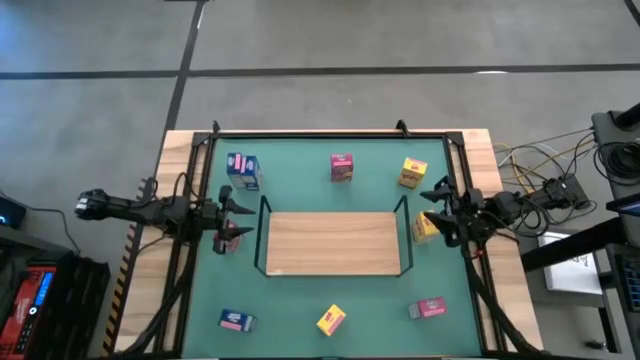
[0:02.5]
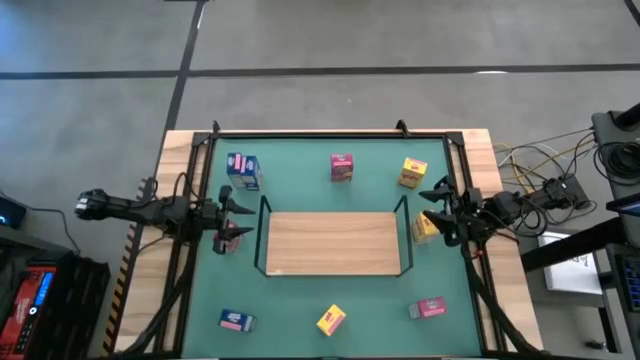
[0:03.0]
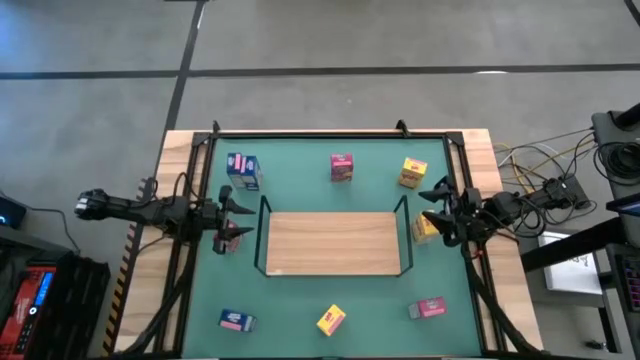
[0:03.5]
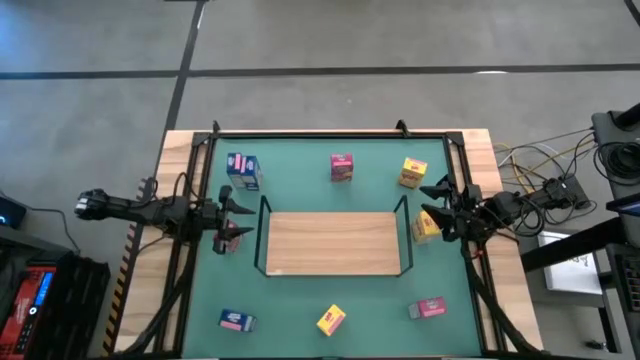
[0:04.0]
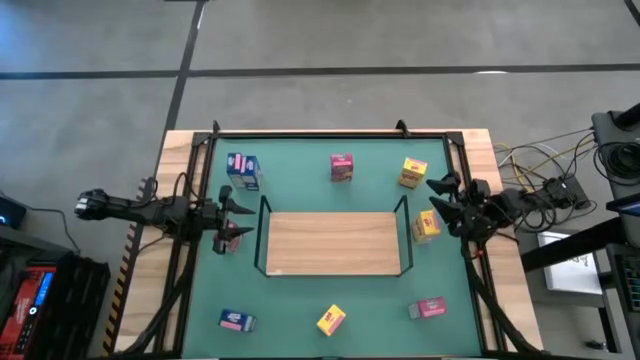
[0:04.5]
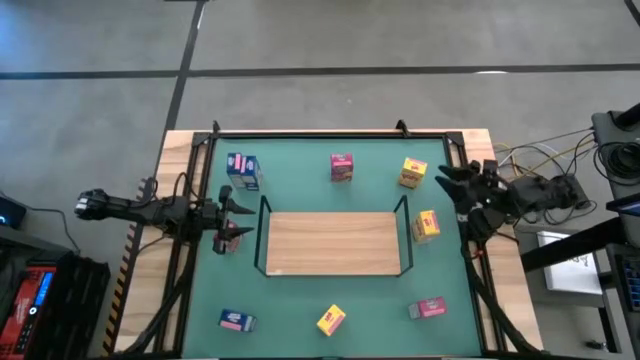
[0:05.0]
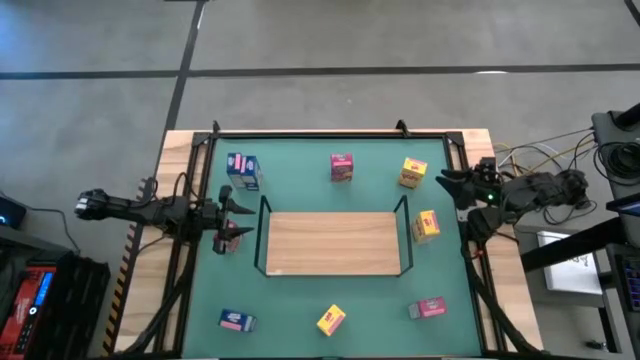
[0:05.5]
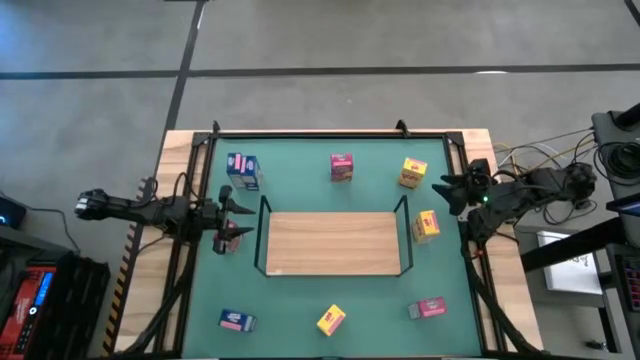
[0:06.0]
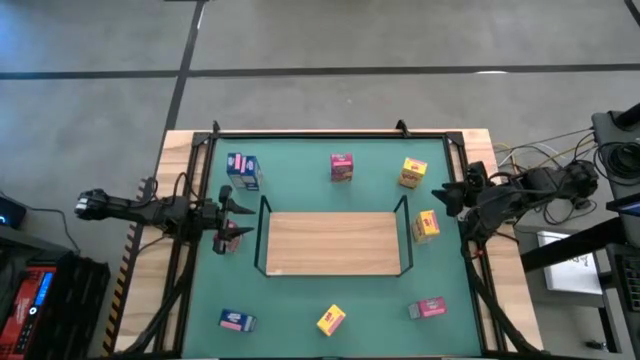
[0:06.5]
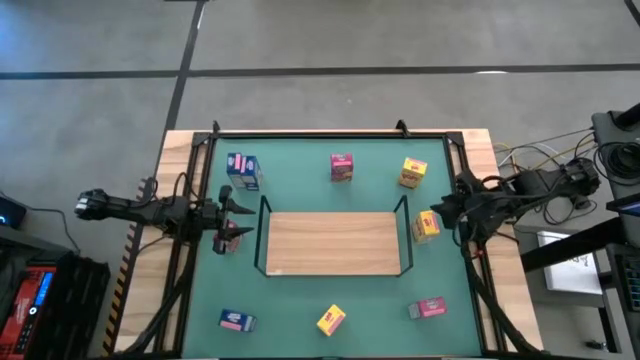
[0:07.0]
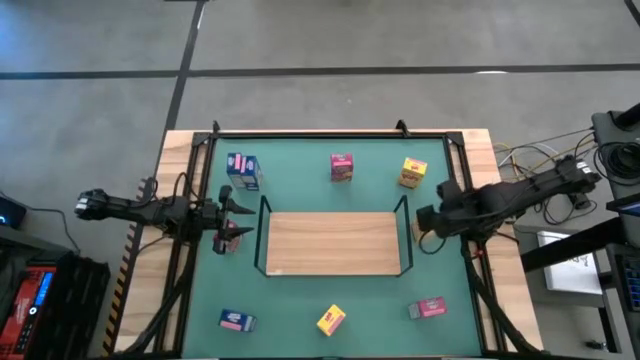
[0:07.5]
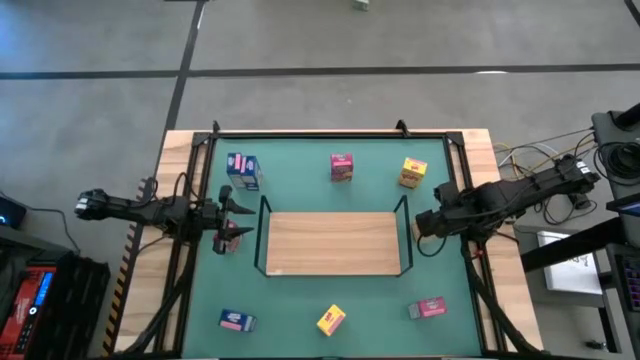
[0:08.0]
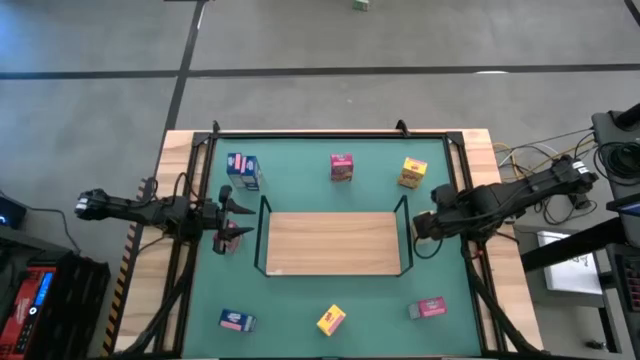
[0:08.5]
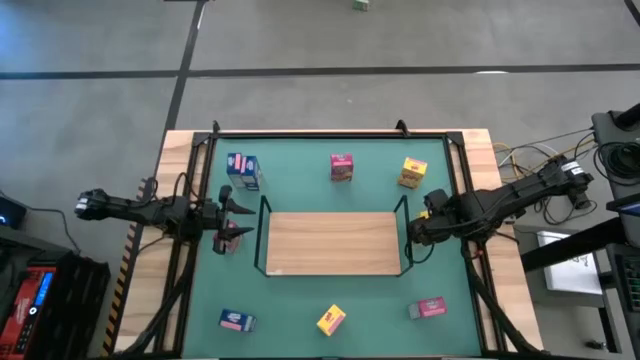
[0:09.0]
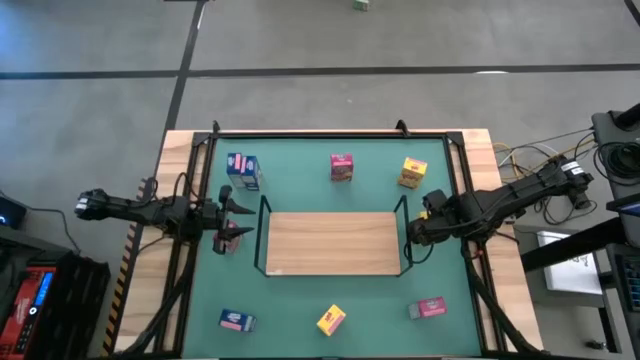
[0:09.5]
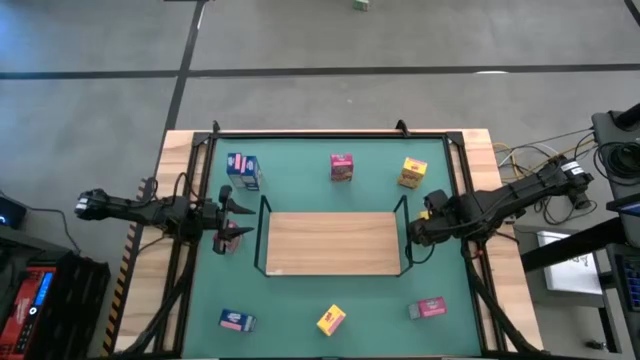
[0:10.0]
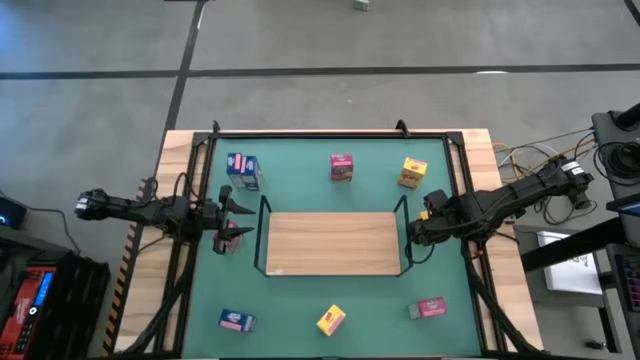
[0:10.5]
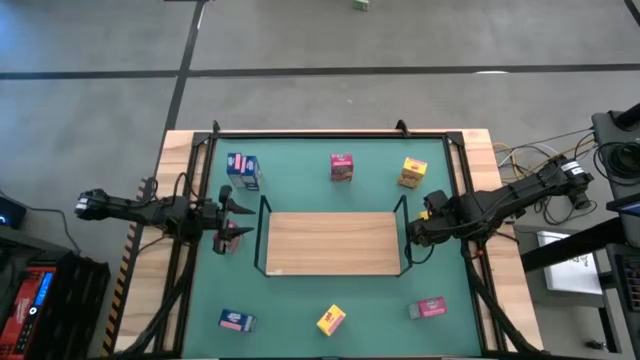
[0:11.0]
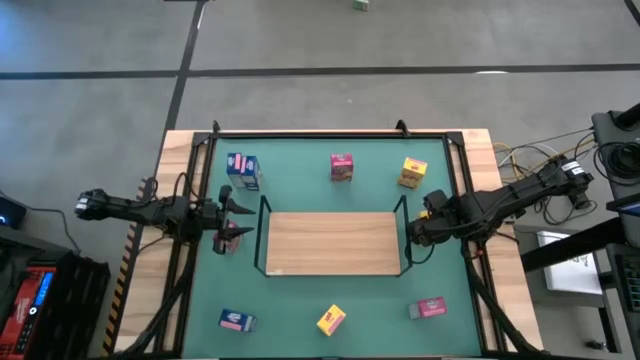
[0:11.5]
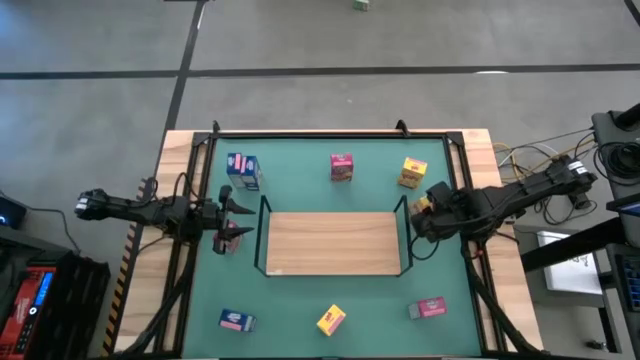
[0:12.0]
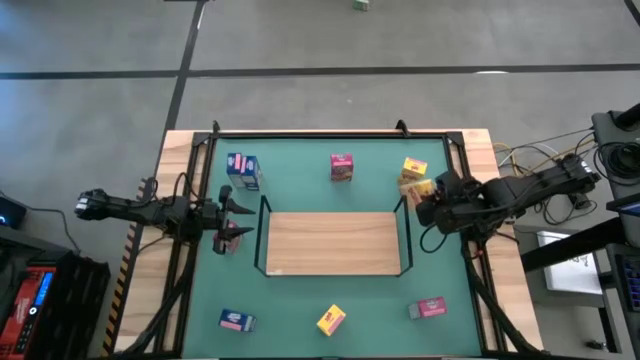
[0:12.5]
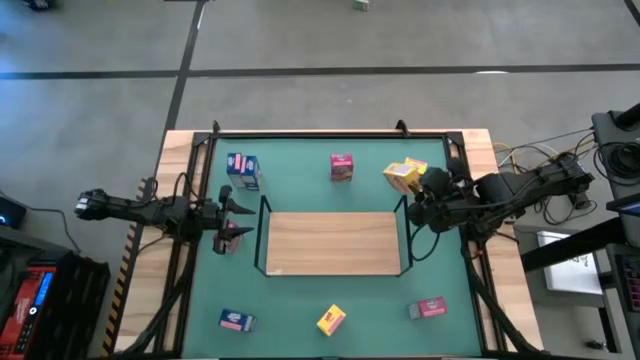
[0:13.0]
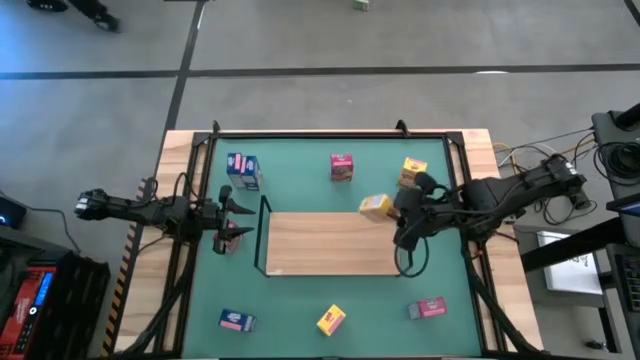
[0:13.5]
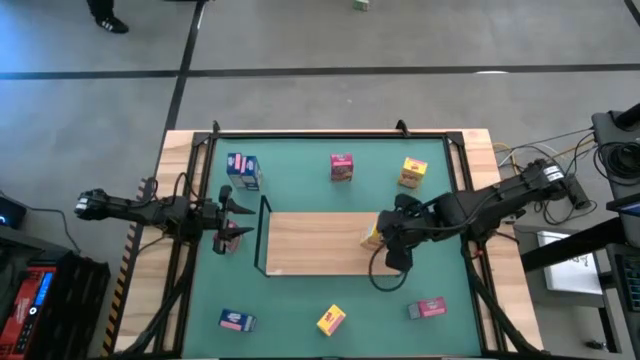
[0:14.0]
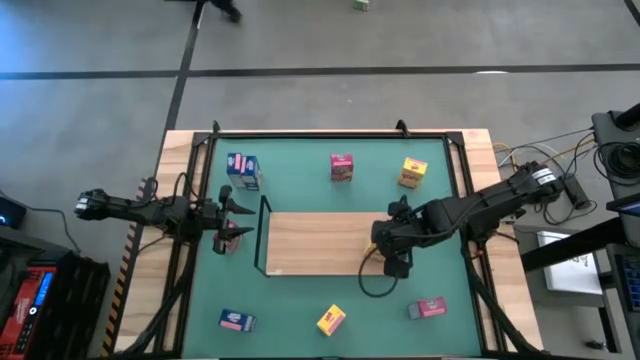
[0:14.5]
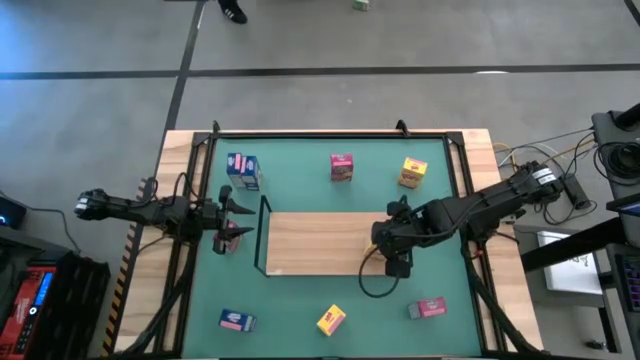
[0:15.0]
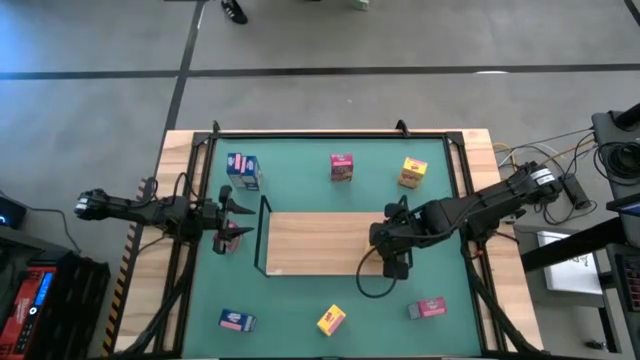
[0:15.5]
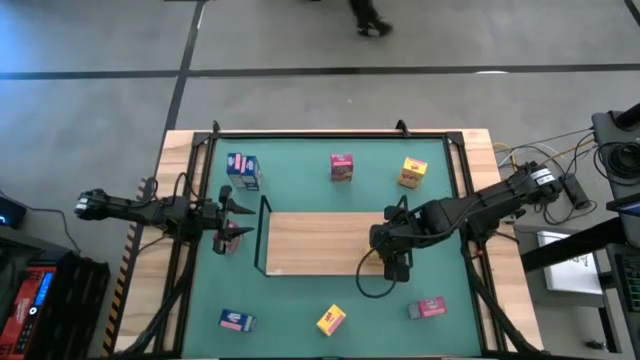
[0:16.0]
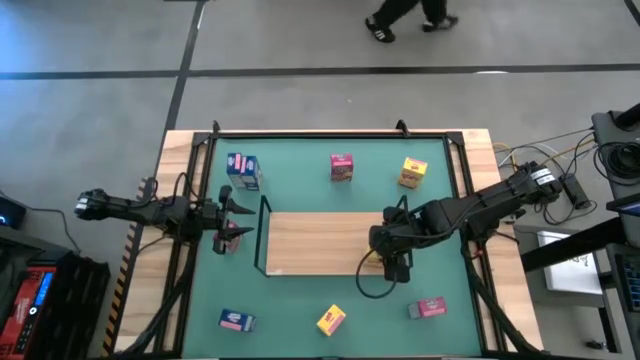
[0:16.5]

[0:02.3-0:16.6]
Task: Stack cereal on shelf
Put the middle yellow cereal box on the shelf

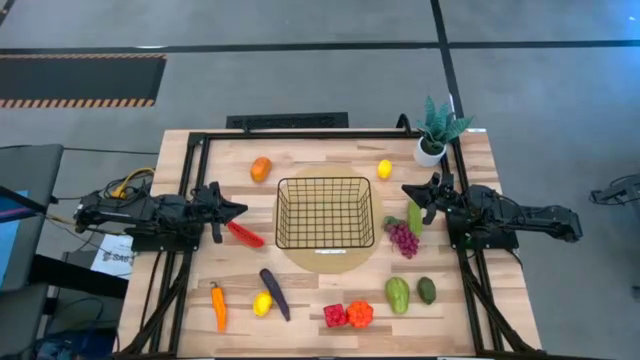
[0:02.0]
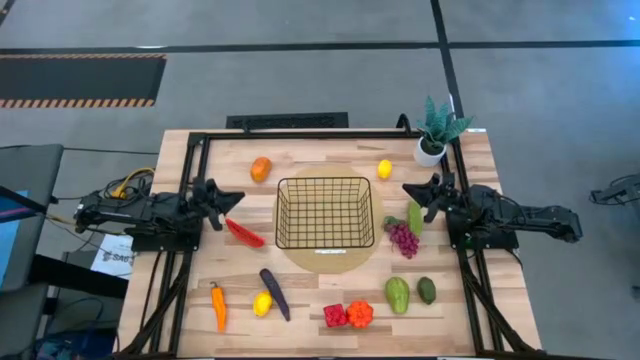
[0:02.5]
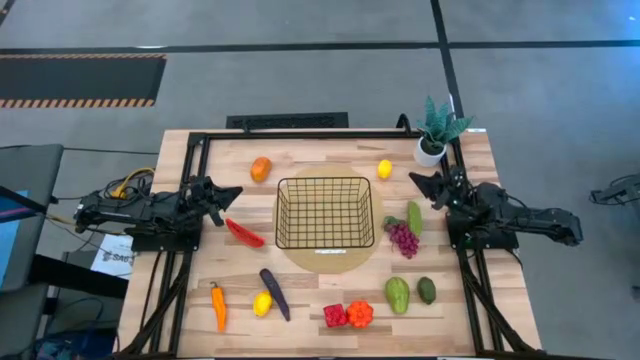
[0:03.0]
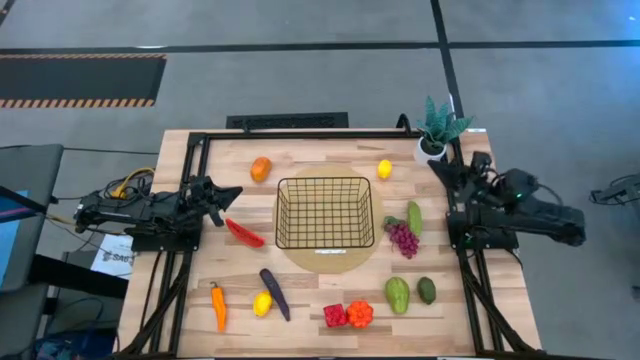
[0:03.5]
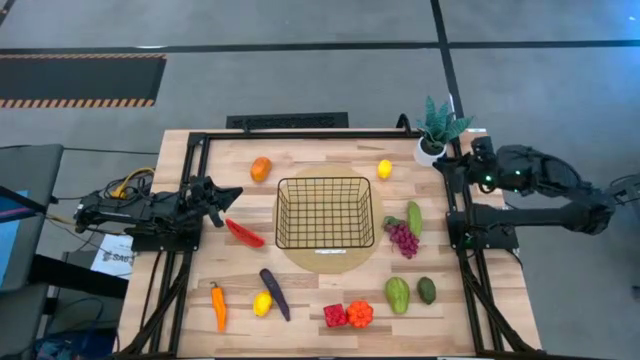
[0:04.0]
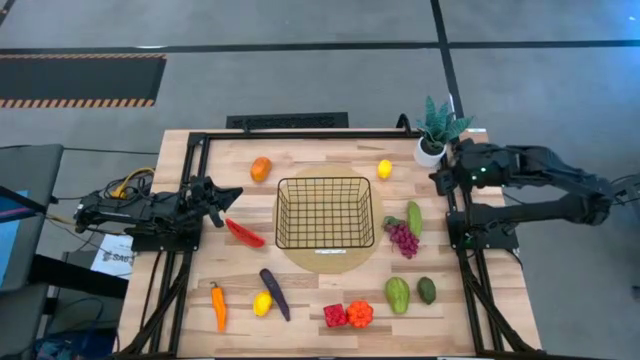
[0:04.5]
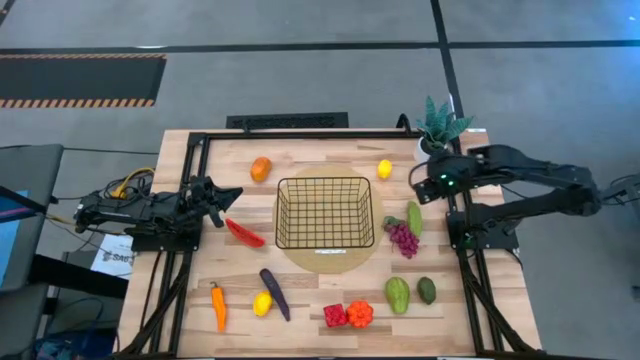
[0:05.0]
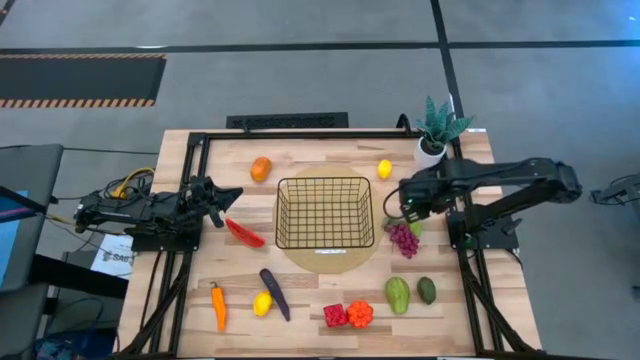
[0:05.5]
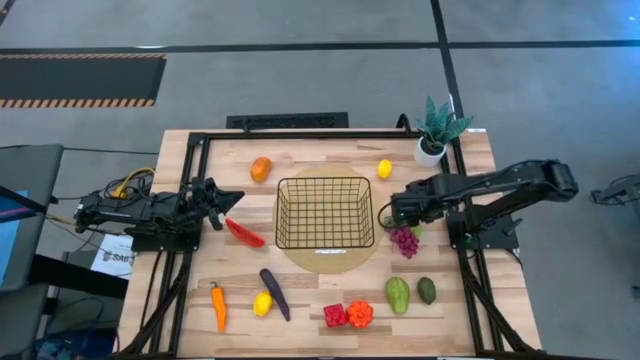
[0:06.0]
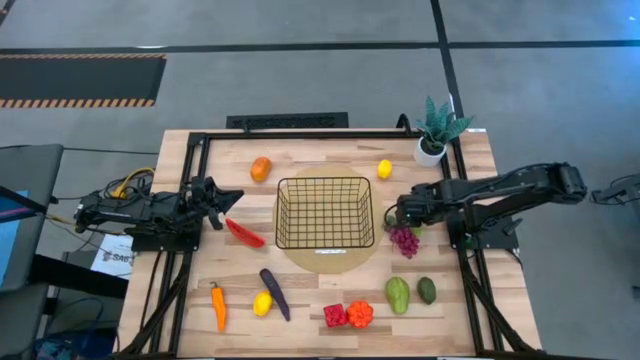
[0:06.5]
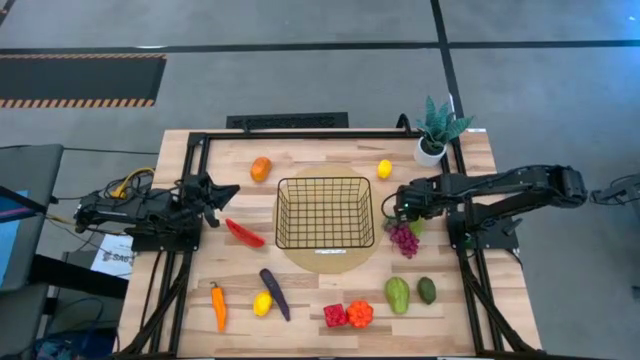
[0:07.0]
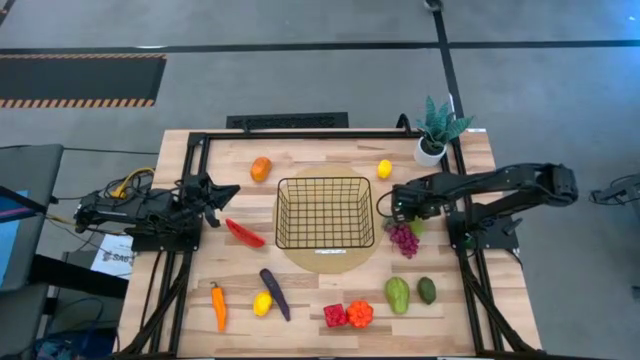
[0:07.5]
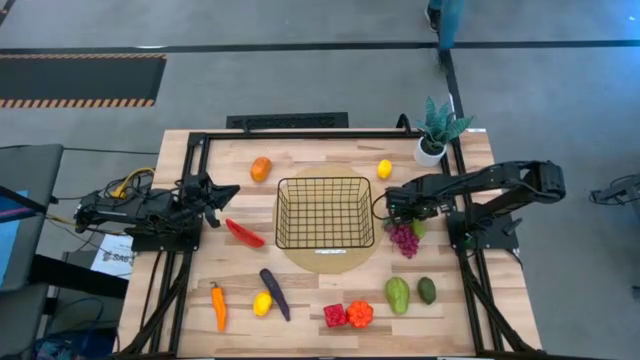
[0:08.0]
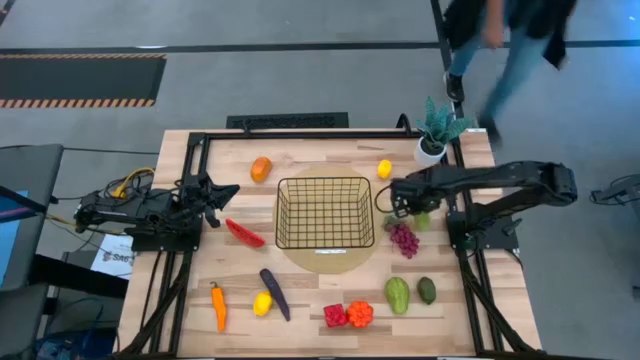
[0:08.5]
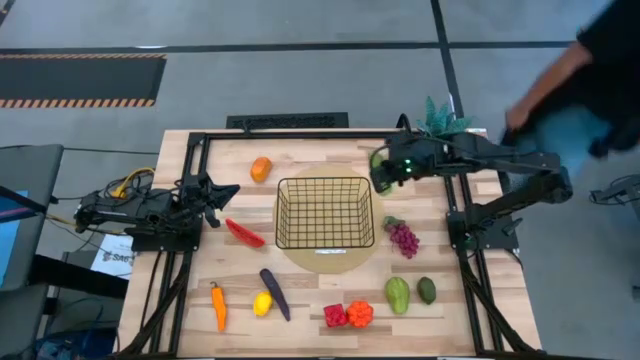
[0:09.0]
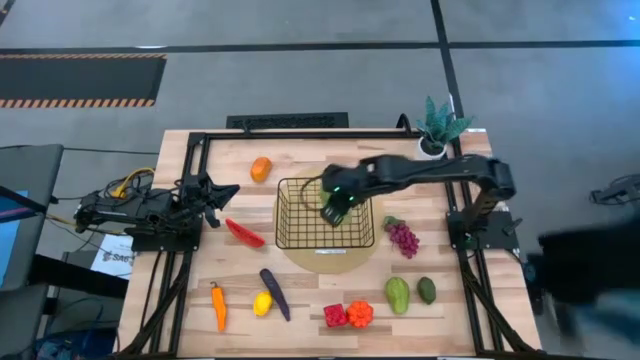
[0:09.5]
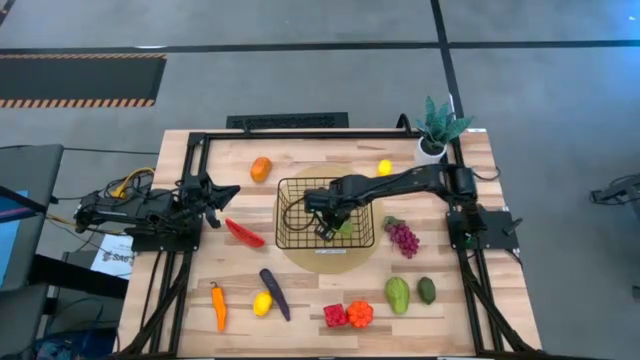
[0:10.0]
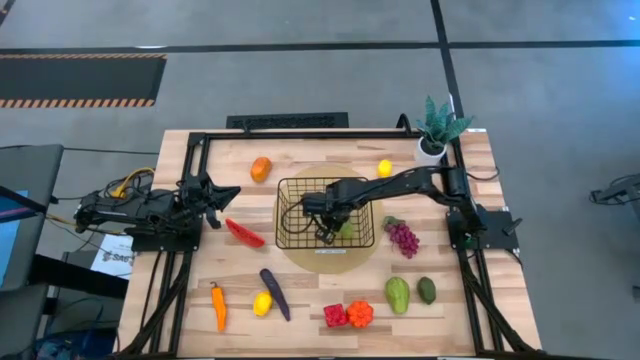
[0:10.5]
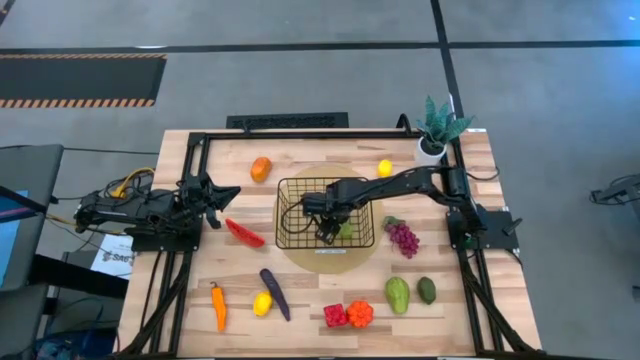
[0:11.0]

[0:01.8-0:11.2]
Task: Build produce basket
Put the green cucumber into the wire basket
